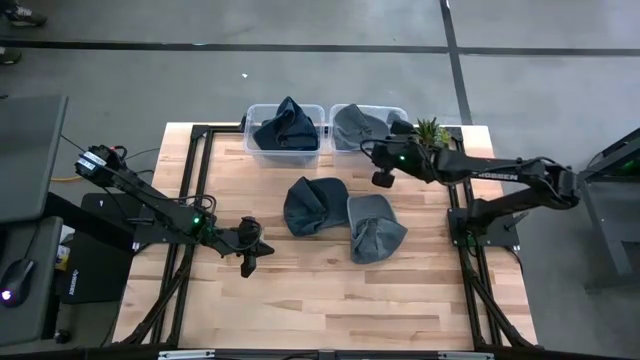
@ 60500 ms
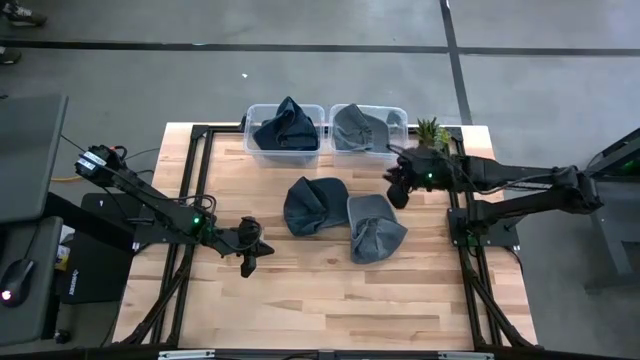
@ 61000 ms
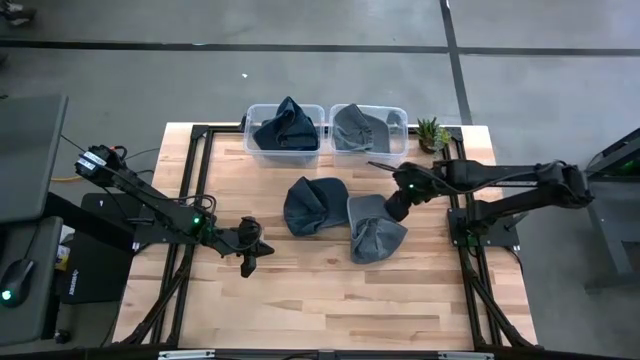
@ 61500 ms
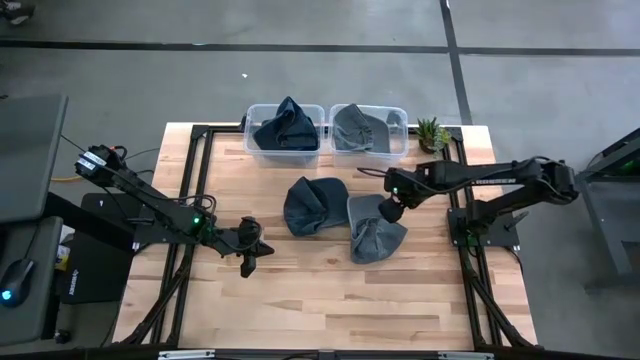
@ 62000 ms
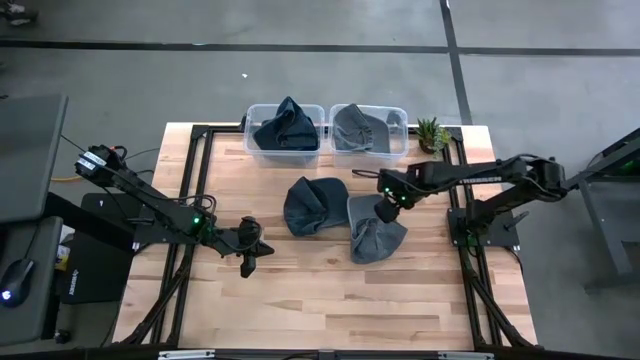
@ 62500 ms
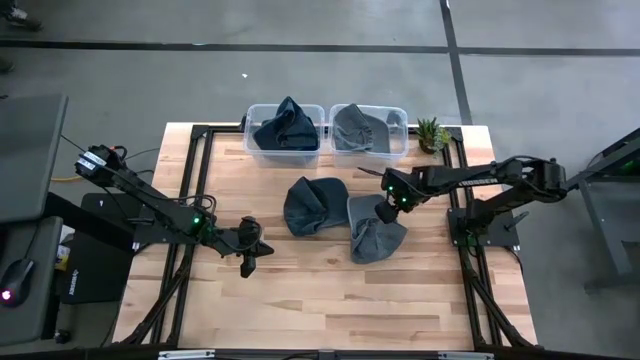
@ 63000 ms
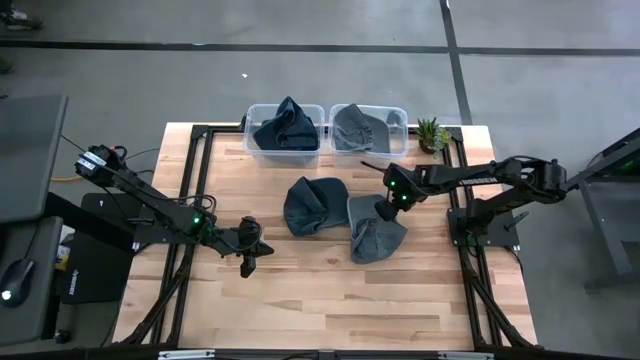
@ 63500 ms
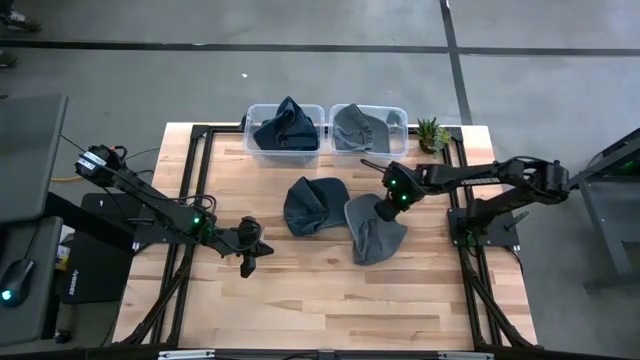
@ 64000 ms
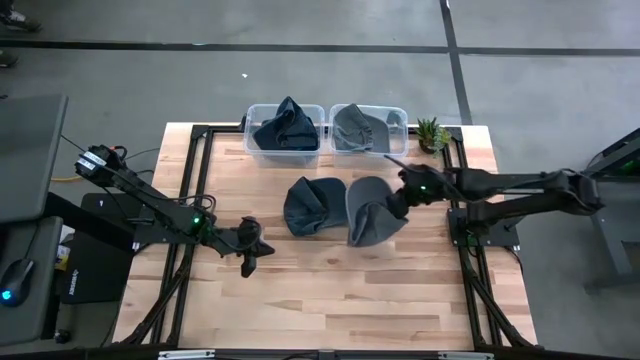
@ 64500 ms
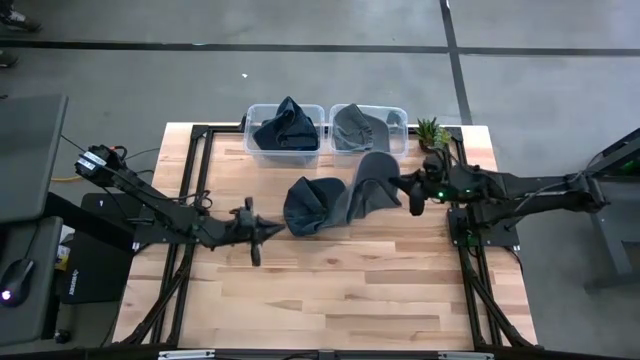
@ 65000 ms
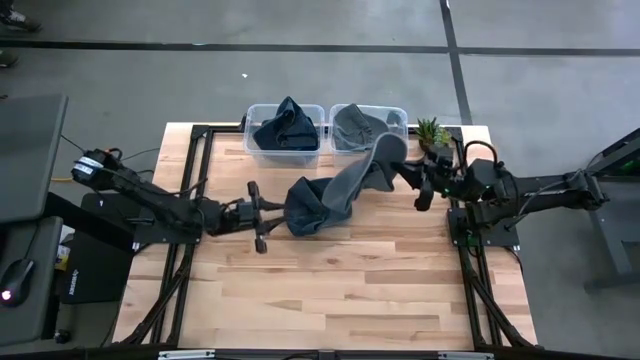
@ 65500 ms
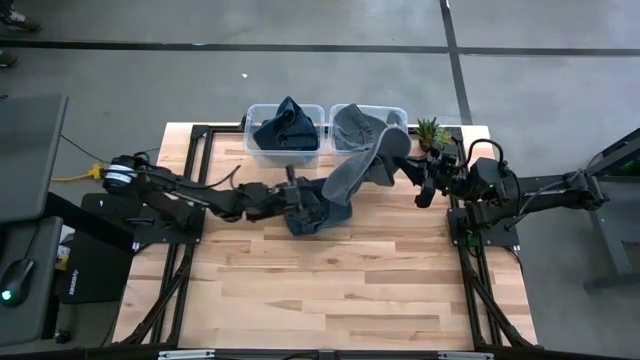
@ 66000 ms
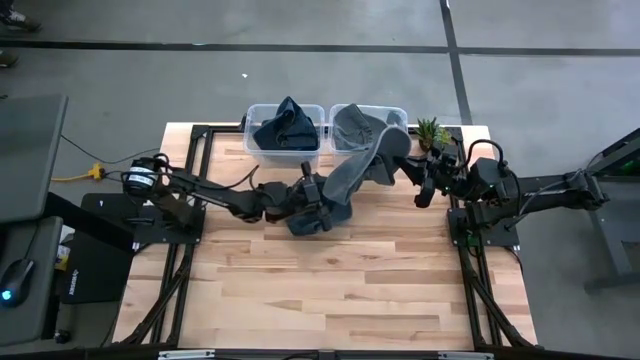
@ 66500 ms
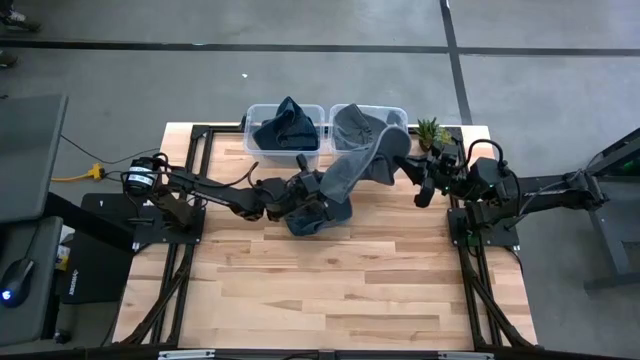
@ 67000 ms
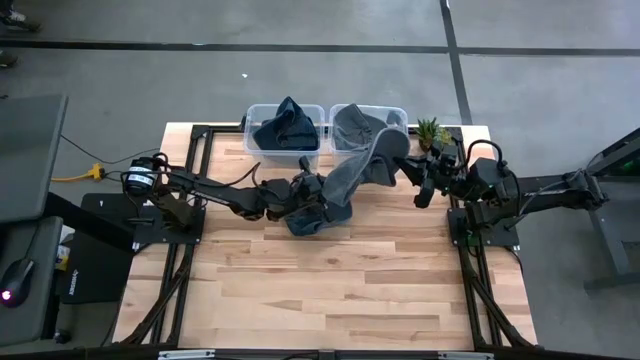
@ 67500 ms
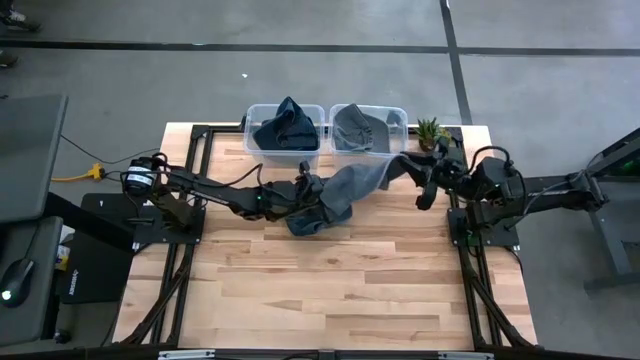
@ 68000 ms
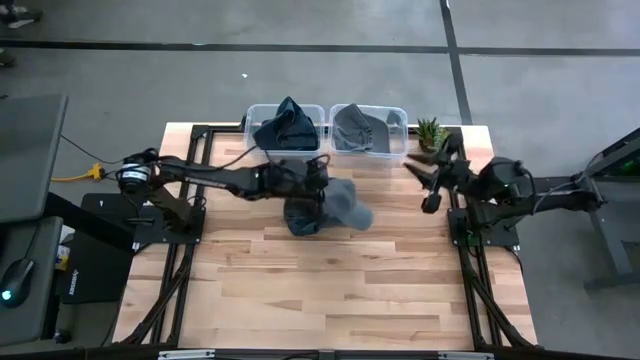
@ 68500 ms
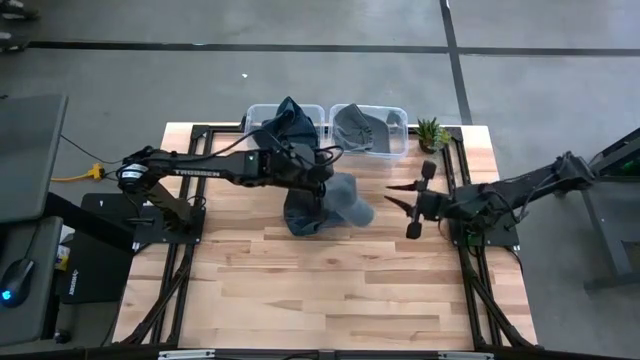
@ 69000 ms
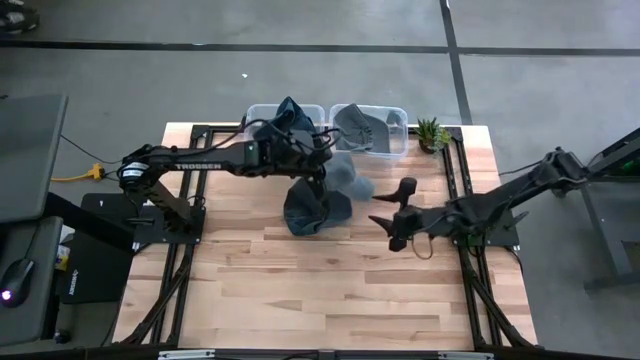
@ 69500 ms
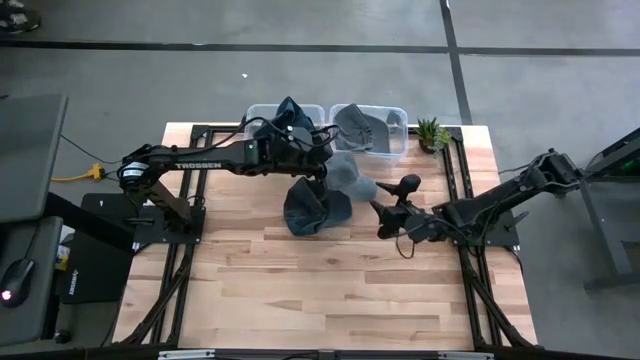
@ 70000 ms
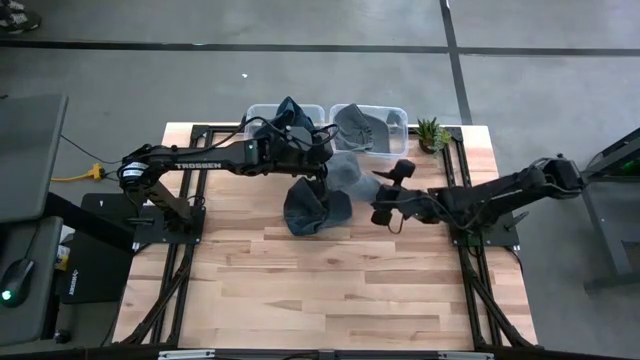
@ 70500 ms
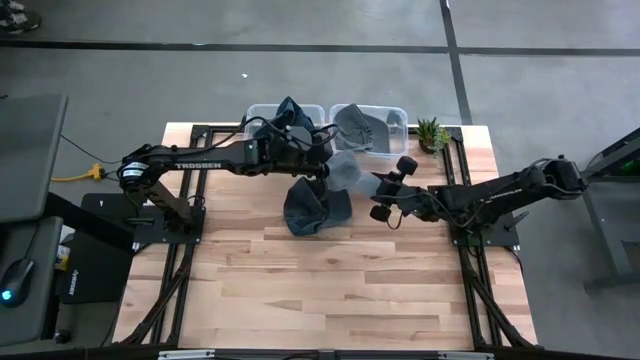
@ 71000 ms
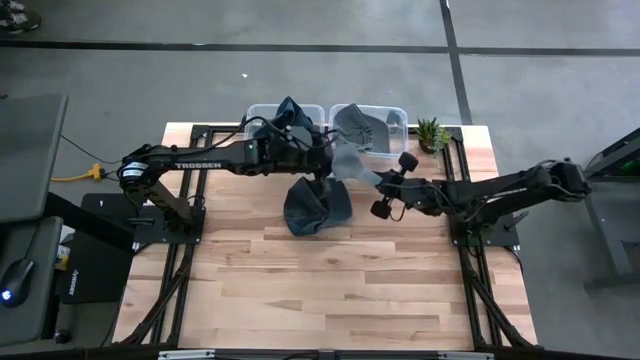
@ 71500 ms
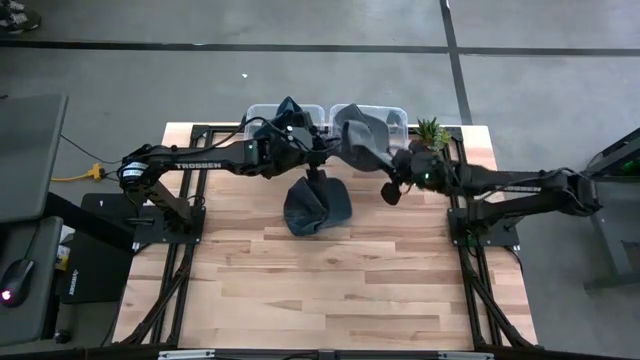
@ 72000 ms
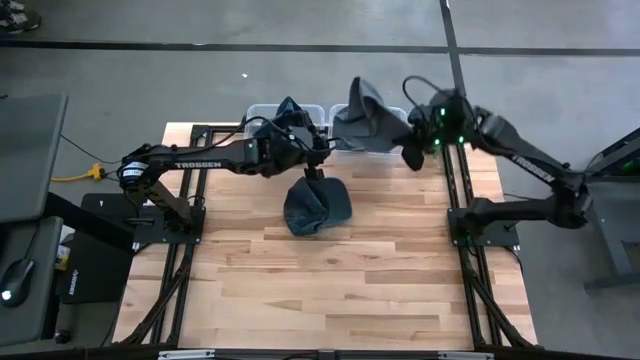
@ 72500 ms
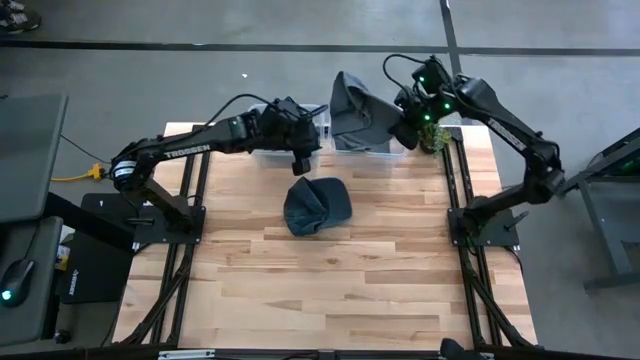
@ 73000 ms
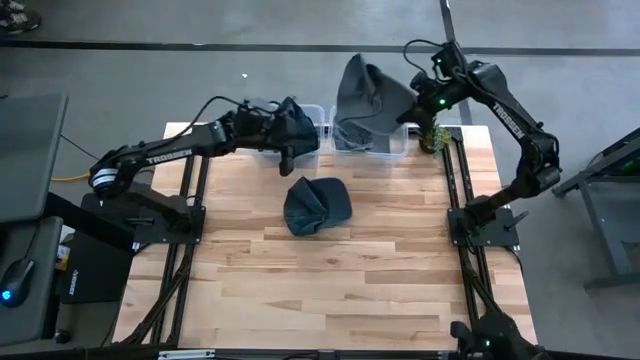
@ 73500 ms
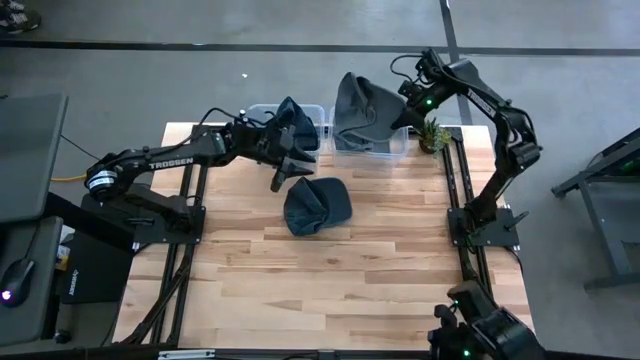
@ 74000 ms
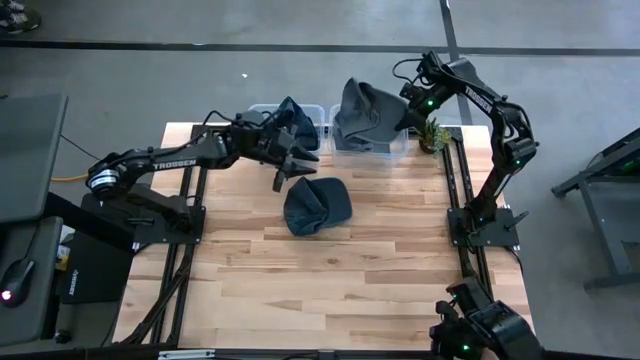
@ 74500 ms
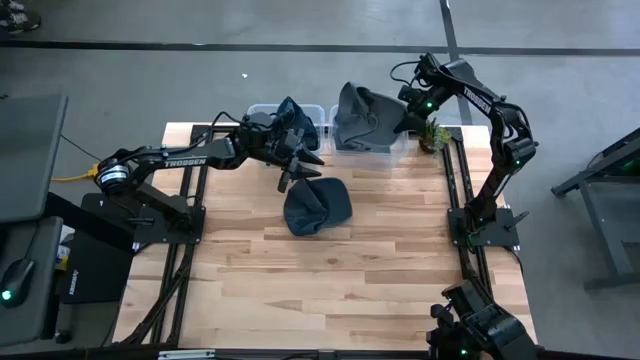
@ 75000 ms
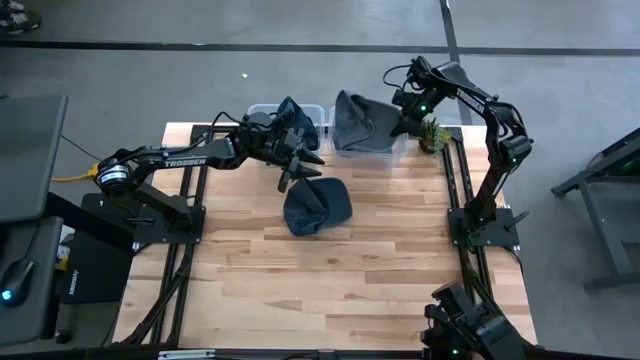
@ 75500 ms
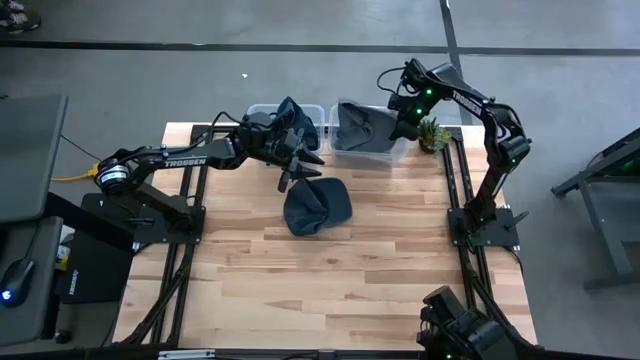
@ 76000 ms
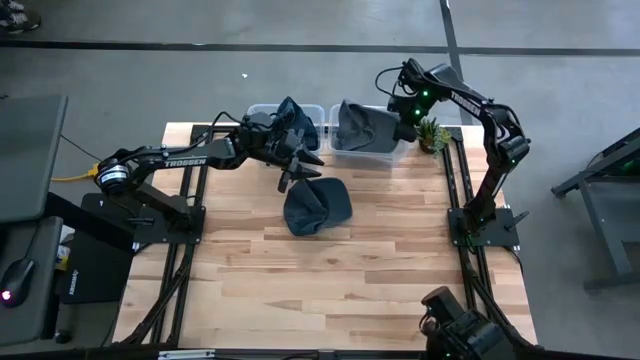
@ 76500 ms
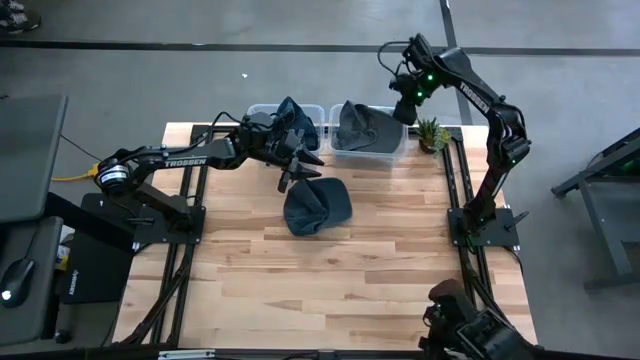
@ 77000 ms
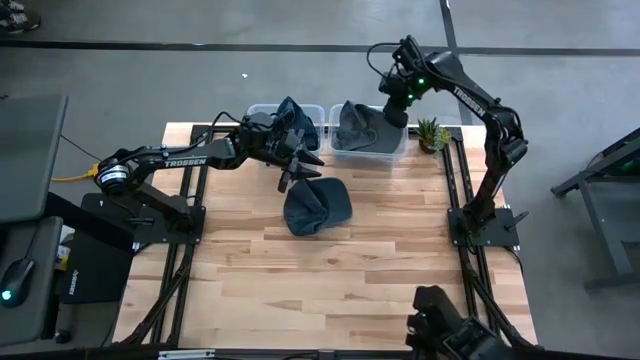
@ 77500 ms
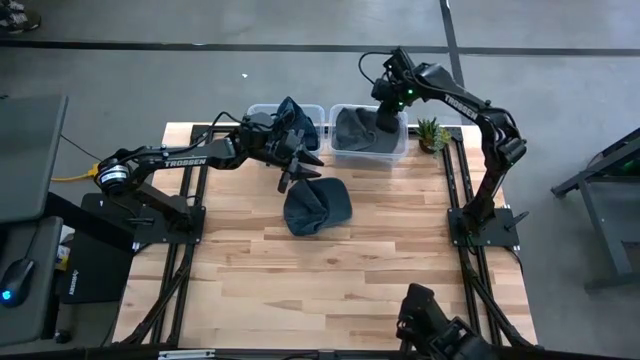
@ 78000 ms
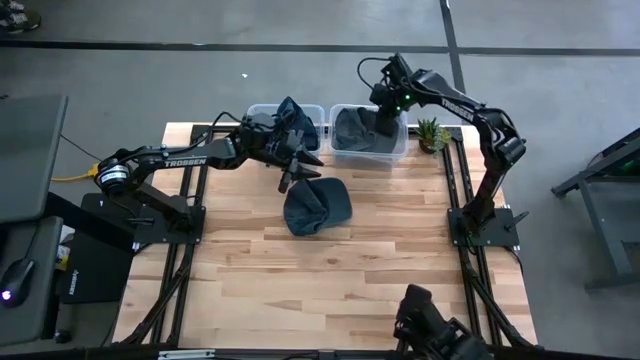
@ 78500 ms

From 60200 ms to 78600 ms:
Task: Pick and place caps into container
Put the gray cap into the right transparent container

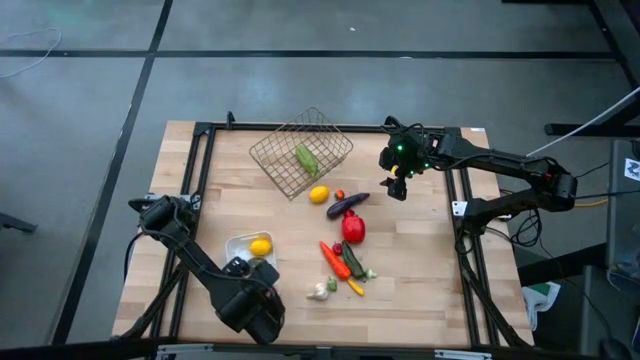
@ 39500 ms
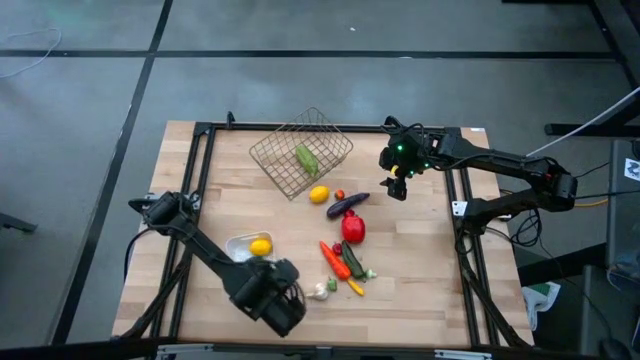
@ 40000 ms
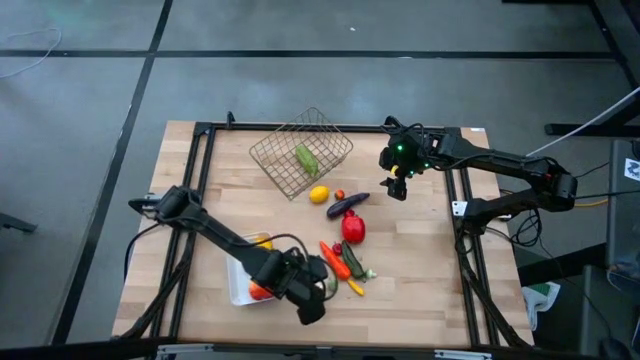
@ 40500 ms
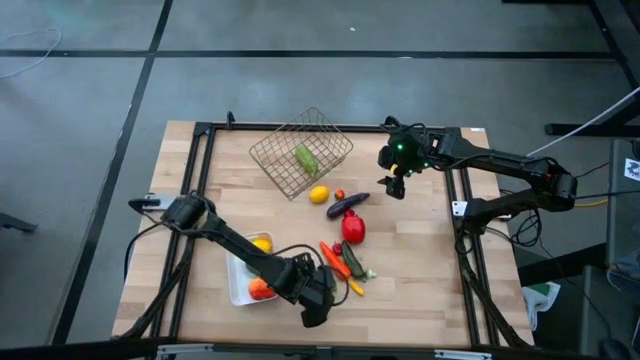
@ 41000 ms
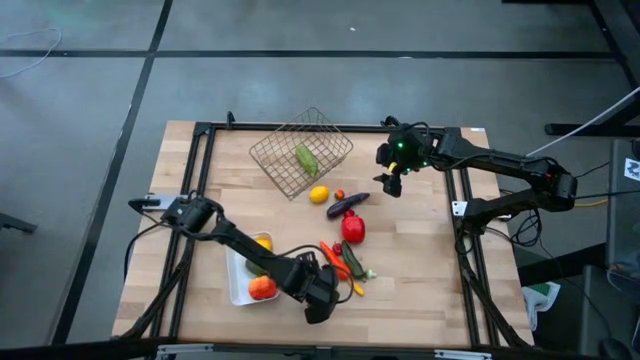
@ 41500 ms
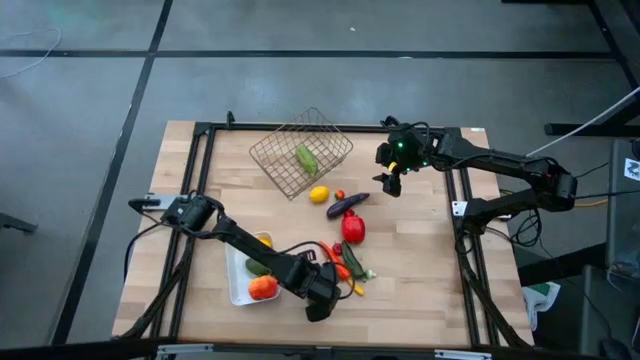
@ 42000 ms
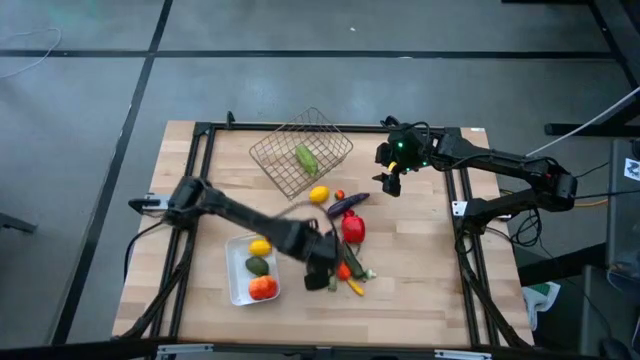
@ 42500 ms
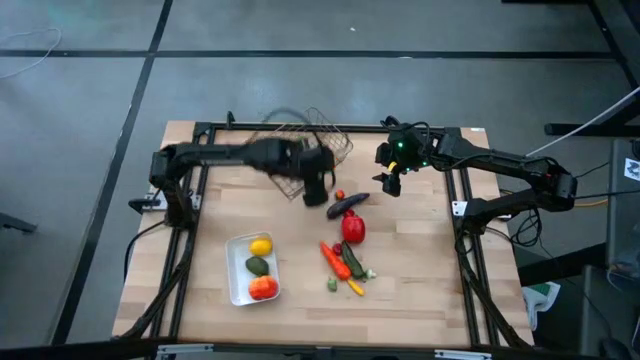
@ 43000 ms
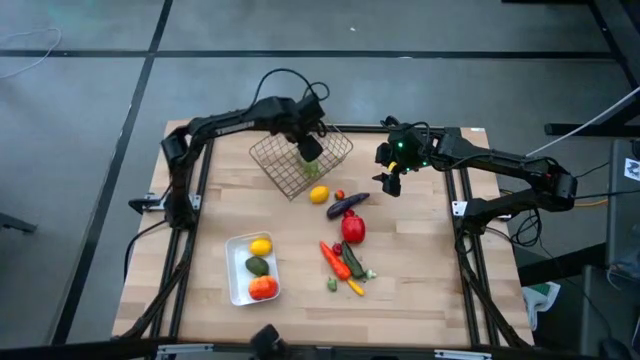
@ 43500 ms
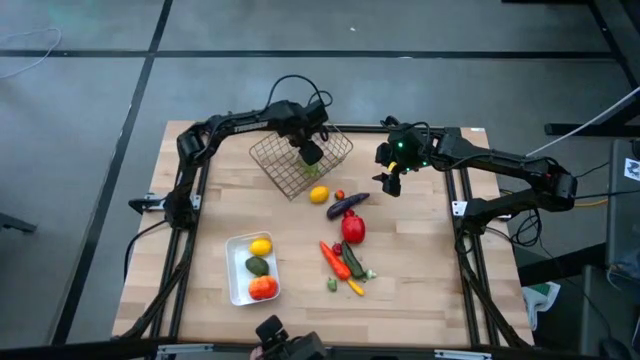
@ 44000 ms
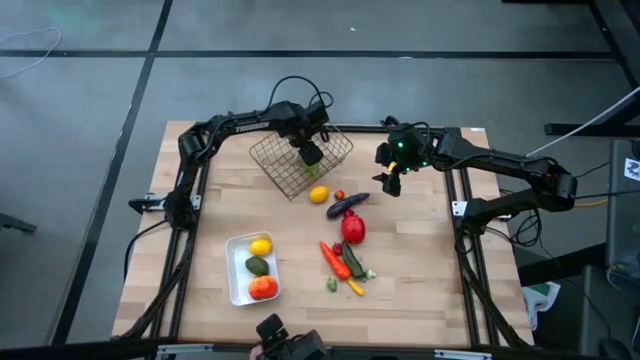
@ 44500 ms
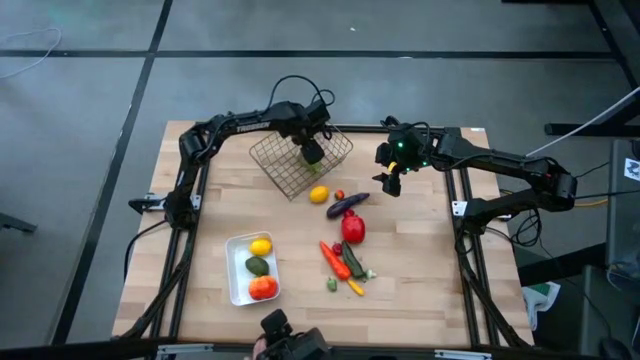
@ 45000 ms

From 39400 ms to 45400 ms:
Task: Sort produce into baskets
Put the white garlic into the gold wire basket
